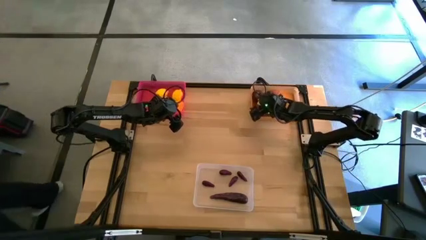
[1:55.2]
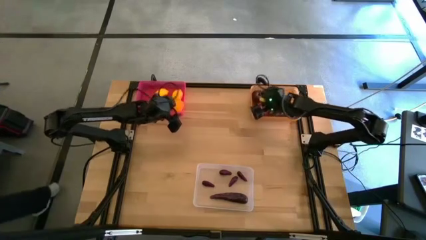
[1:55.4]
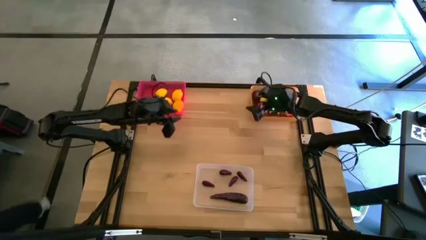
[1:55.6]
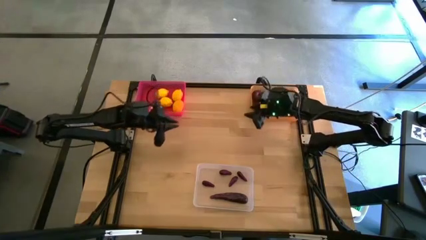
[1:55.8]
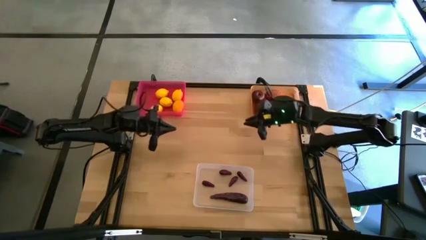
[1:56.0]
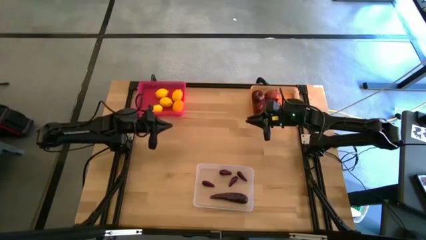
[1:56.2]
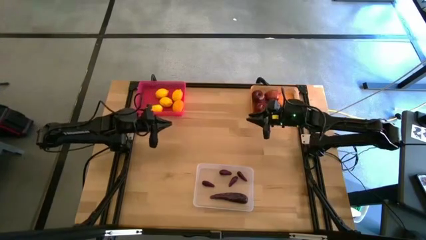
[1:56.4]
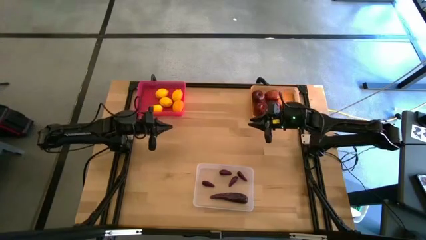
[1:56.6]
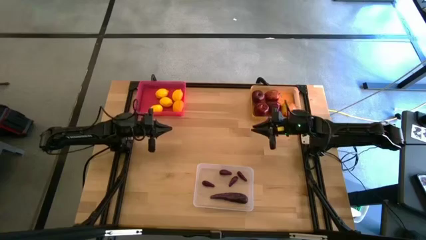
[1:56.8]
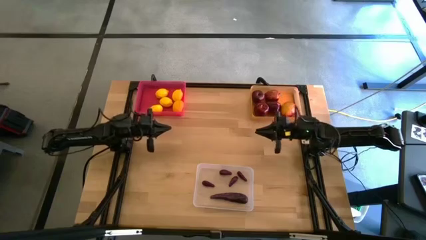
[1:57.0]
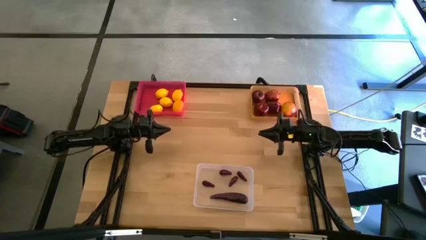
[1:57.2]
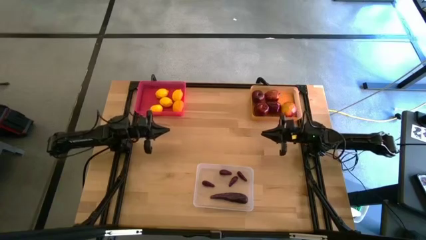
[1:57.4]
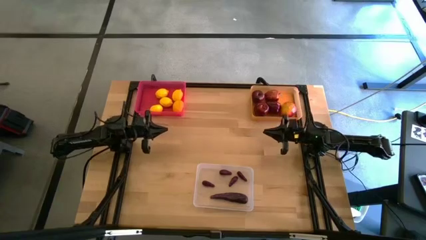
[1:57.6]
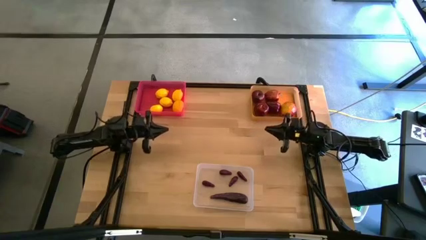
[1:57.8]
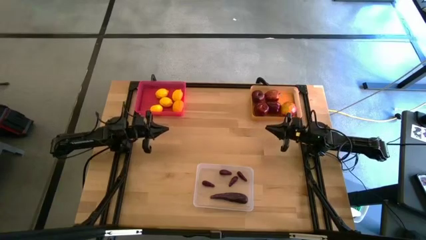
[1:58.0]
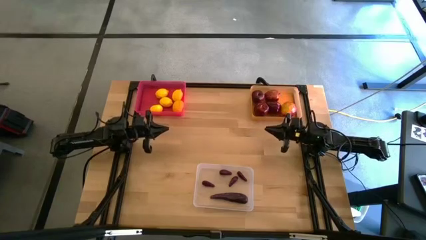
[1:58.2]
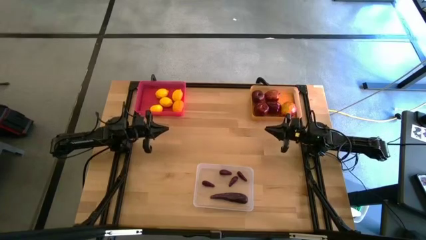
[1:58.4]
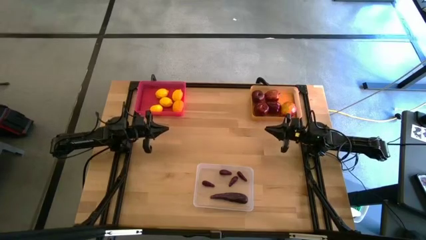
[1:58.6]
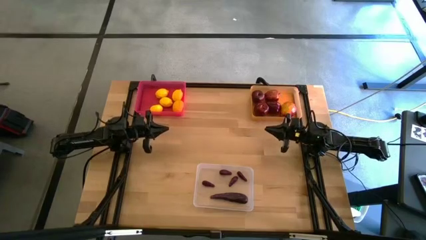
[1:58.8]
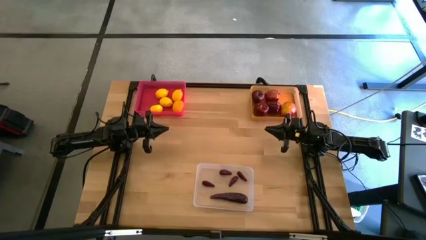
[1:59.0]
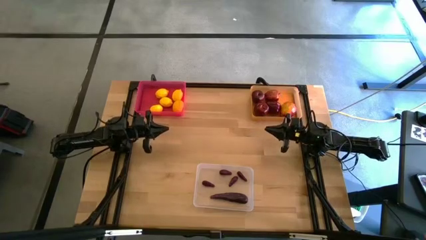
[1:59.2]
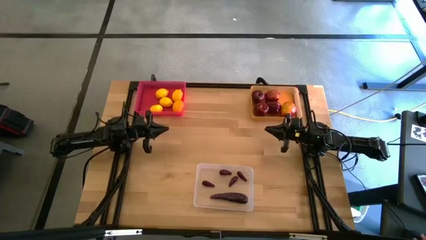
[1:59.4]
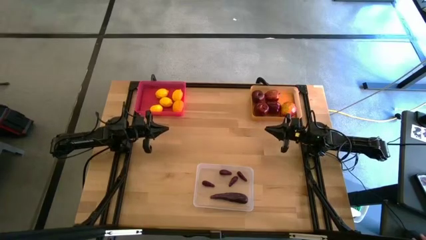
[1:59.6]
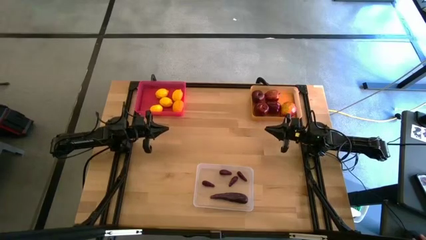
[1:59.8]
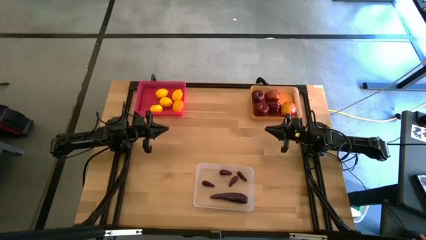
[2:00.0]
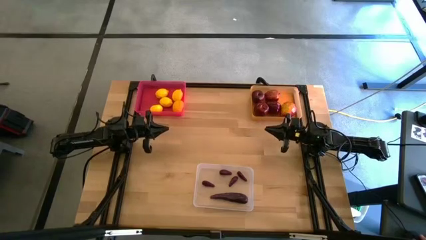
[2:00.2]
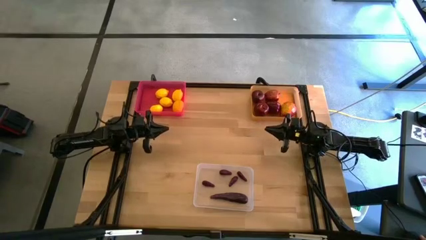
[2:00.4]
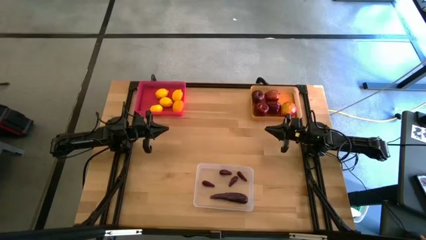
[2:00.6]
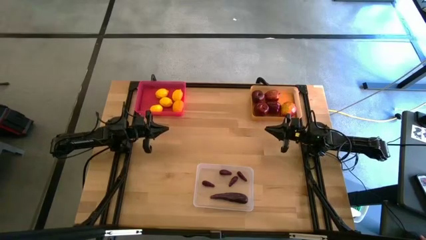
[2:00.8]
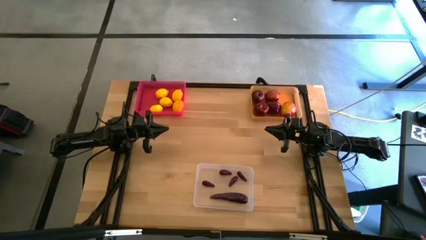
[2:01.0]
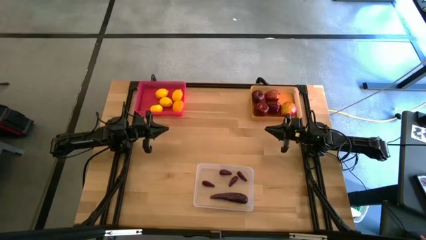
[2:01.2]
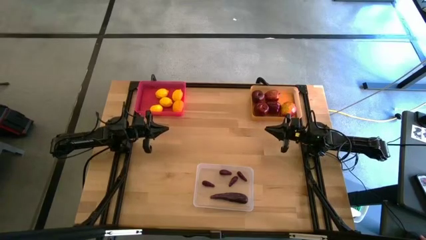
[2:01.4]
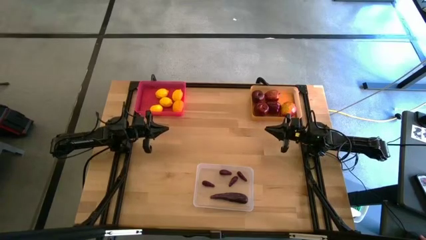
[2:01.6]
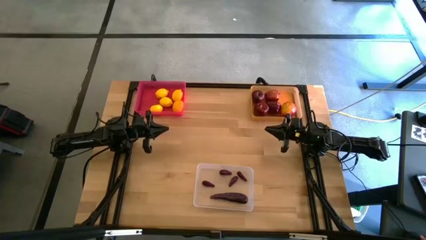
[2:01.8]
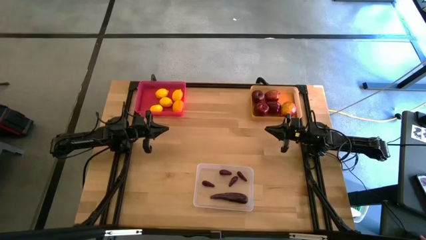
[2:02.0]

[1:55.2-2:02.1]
Task: Sort produce into baskets
Return to Home Position

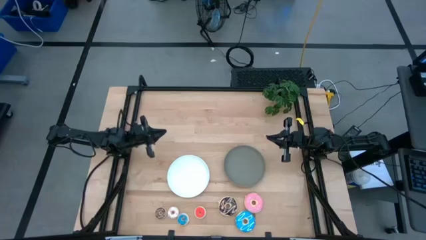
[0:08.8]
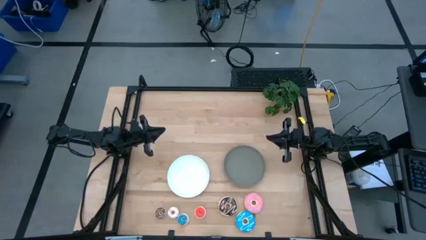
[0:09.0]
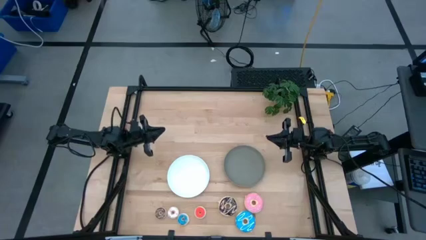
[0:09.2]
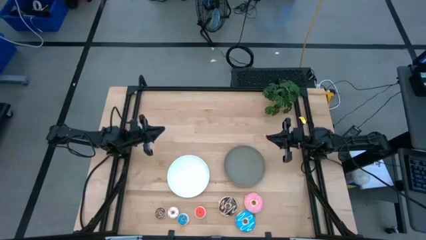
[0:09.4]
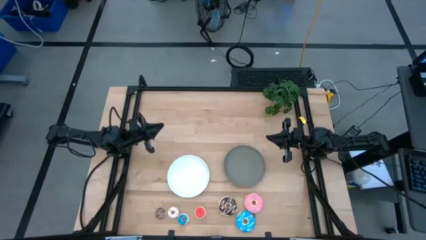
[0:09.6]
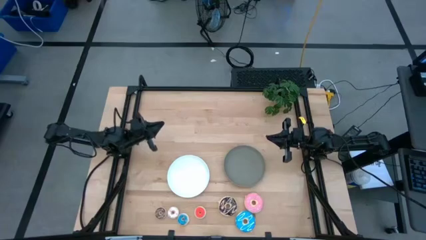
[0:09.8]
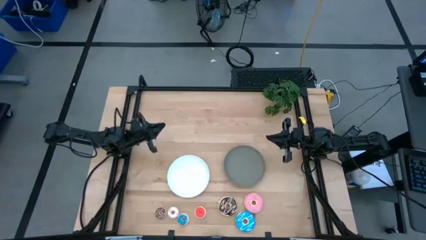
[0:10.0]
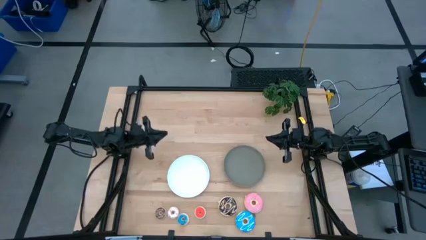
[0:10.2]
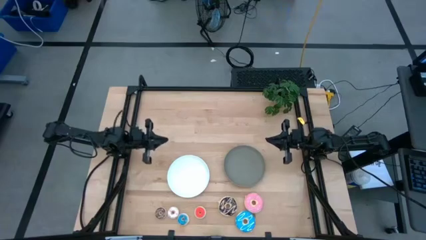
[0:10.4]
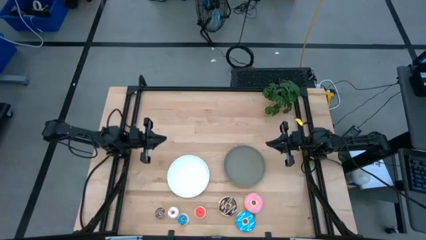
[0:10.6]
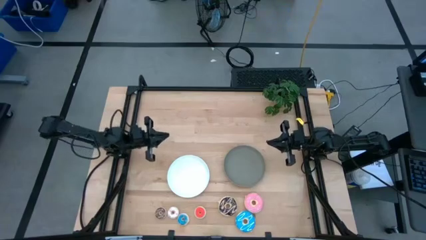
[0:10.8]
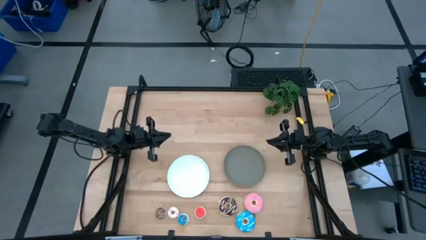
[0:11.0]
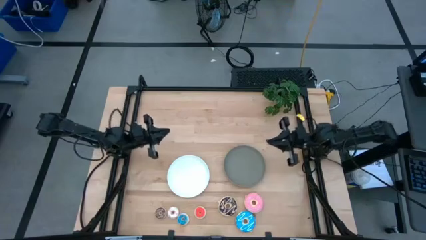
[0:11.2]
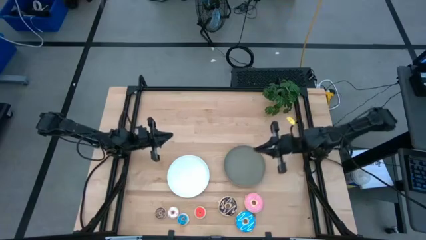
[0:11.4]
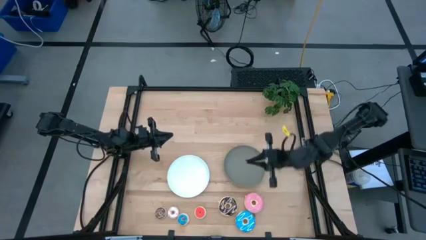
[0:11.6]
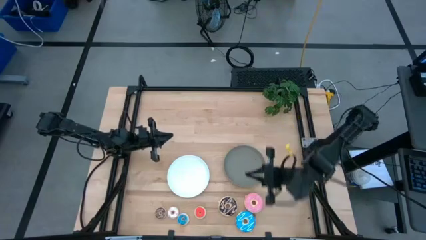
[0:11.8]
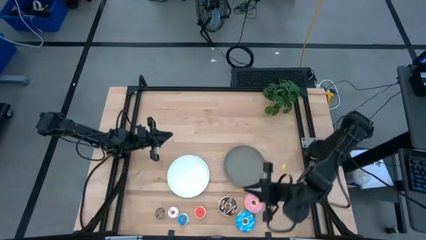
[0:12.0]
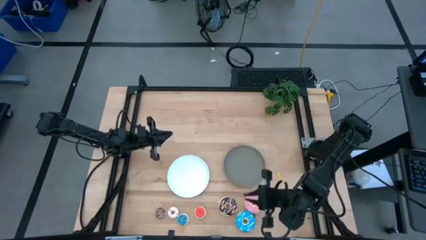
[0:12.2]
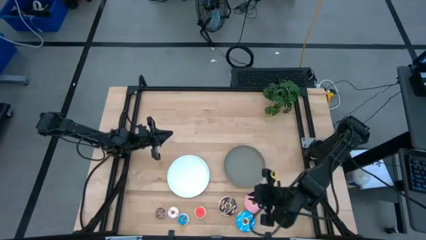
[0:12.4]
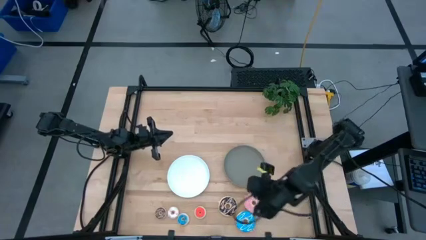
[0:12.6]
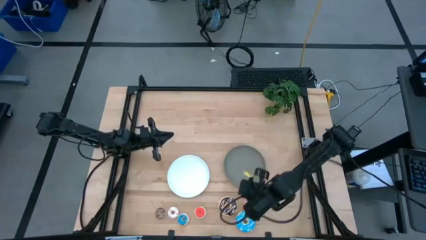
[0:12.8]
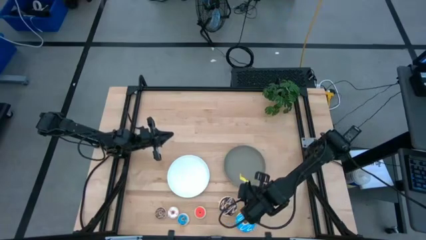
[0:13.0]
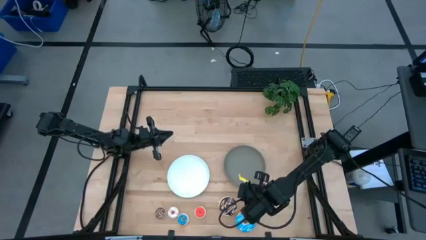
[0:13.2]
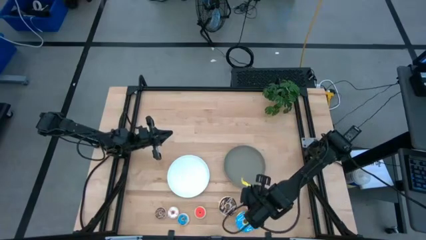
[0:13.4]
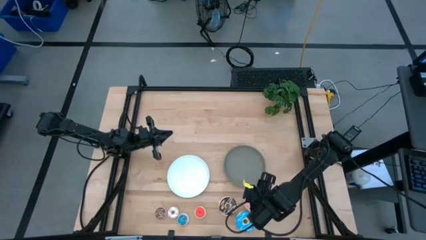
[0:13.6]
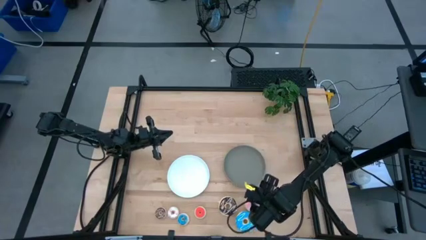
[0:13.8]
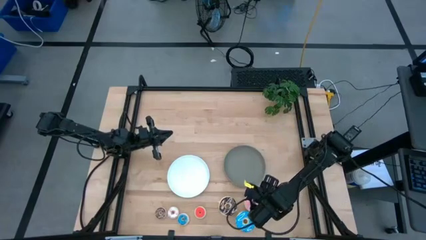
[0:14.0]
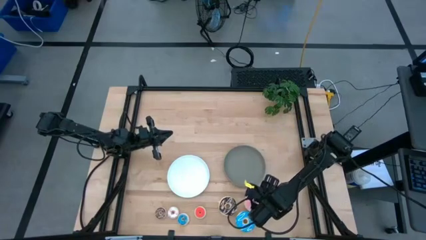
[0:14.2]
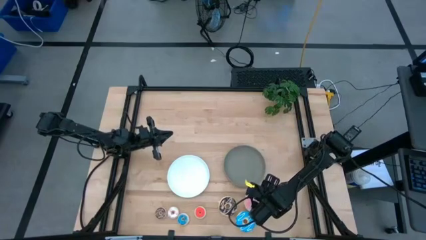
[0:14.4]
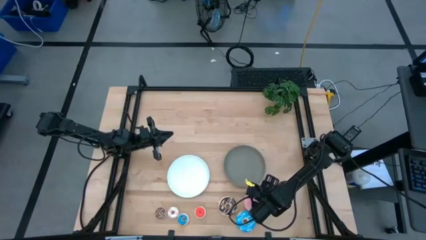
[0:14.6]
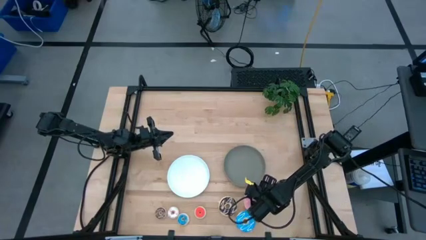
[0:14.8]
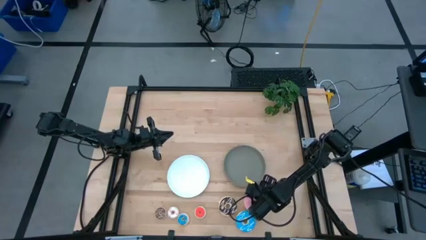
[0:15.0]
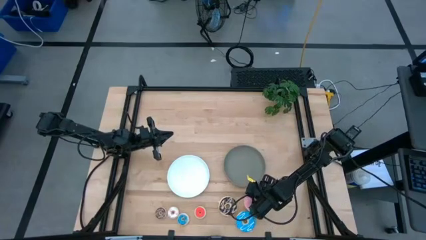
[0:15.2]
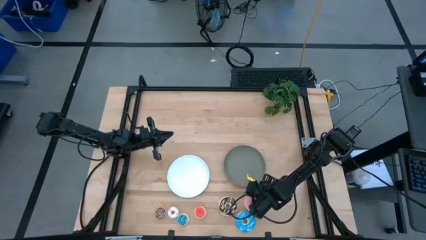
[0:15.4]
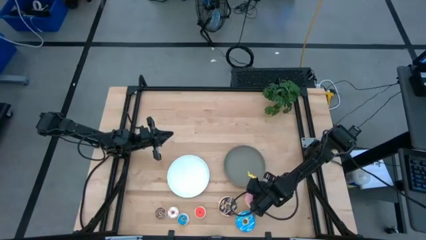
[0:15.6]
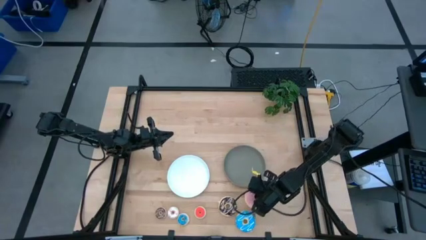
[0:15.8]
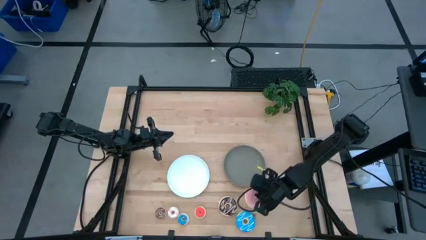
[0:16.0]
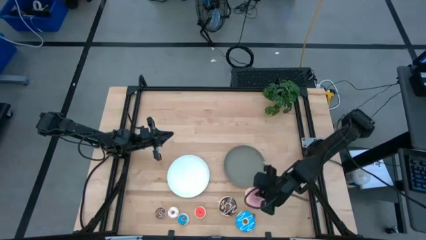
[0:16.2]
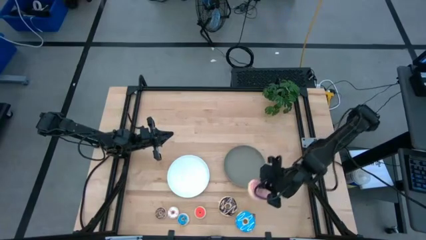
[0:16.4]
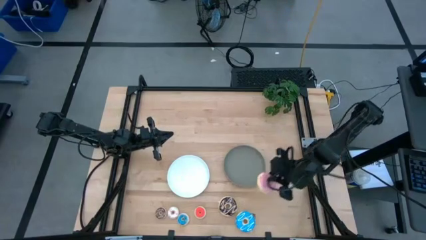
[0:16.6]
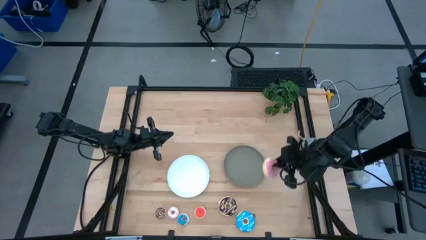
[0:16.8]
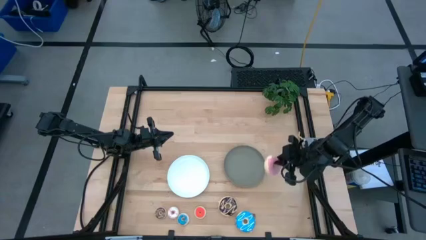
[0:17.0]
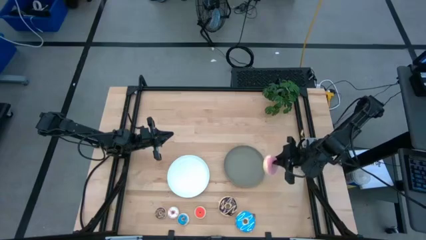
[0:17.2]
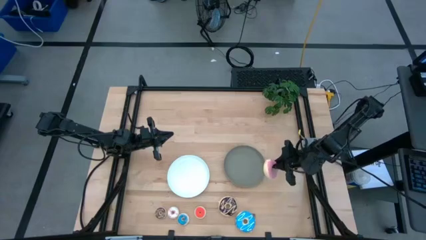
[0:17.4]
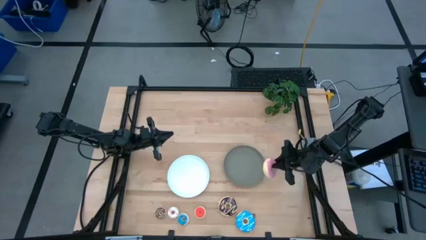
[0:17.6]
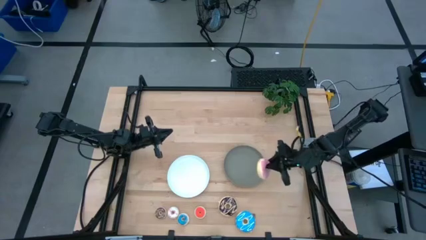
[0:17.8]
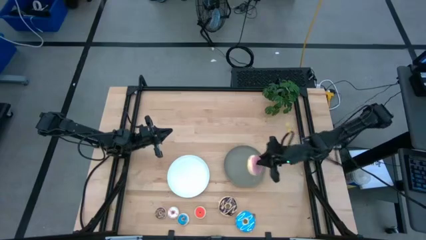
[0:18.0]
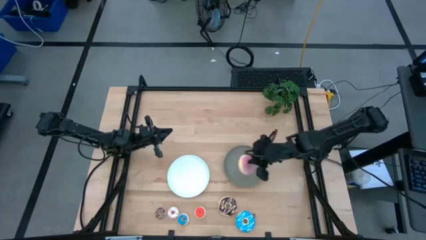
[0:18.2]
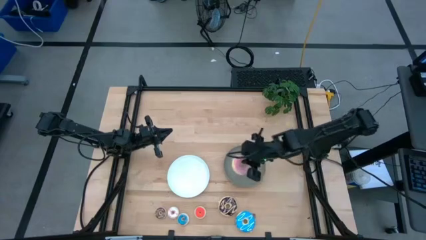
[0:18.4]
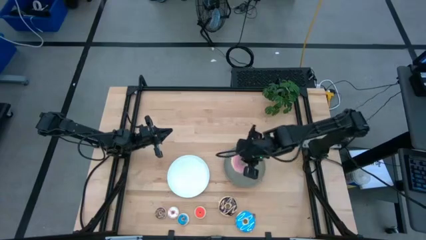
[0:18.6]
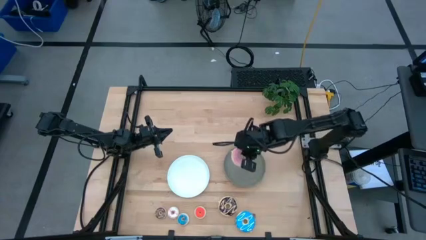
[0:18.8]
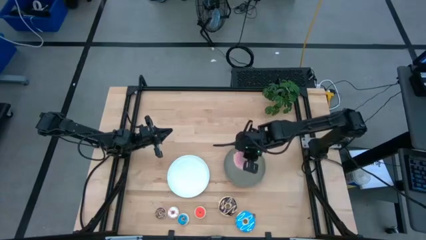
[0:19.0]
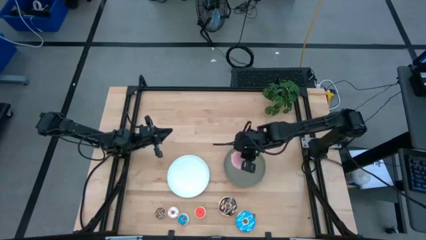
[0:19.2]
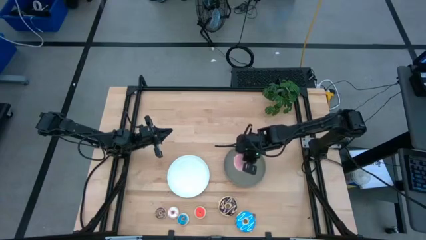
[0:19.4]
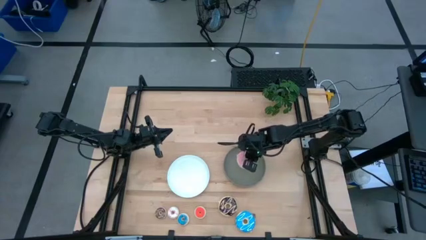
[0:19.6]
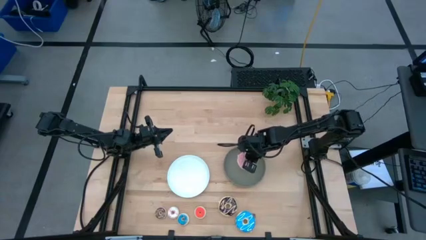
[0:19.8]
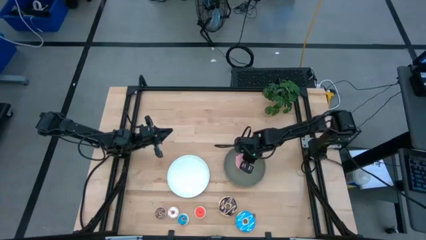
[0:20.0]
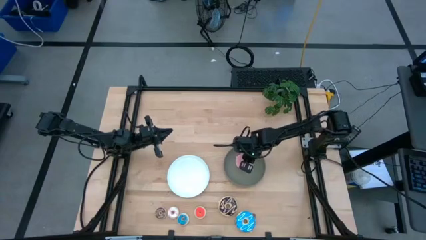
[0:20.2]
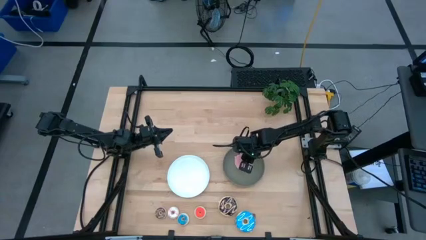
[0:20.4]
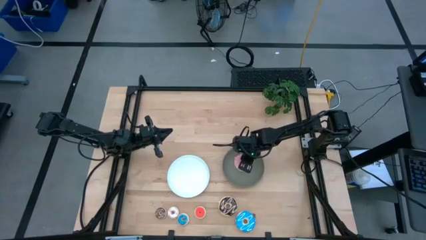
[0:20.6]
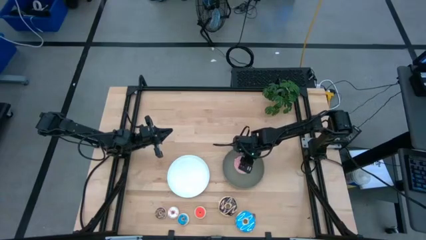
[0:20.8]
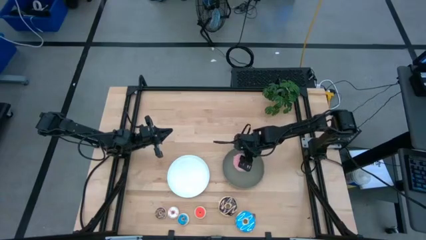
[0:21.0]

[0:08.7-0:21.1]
Task: Pick & Place donuts
Put the large pink donut on the brown plate
